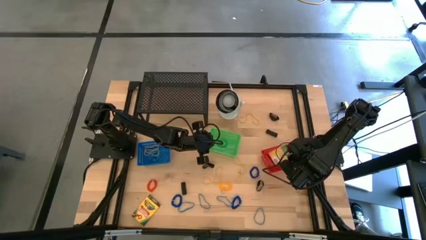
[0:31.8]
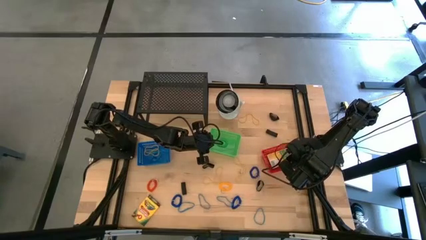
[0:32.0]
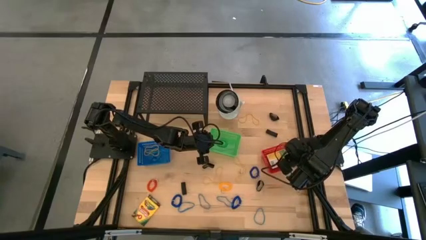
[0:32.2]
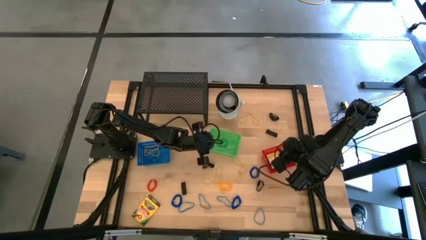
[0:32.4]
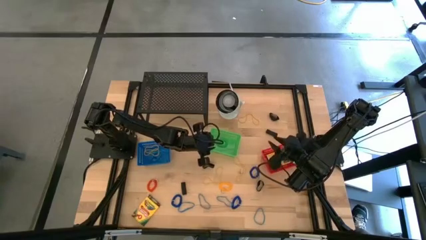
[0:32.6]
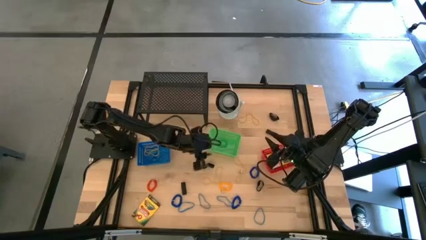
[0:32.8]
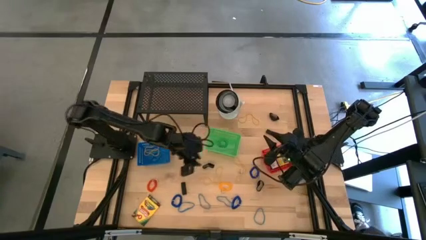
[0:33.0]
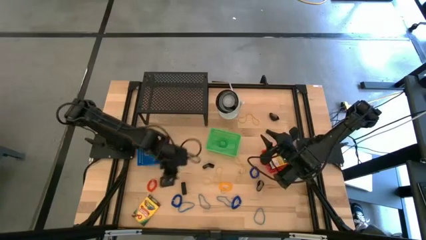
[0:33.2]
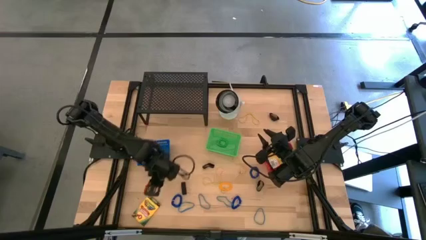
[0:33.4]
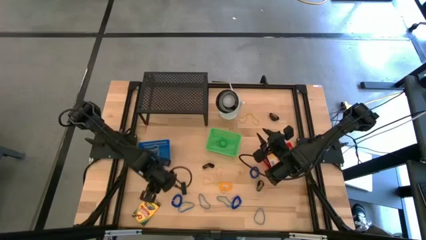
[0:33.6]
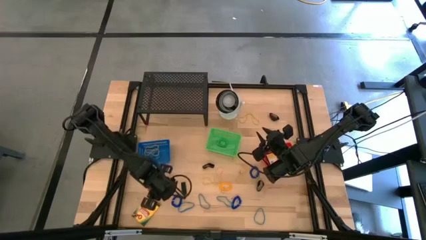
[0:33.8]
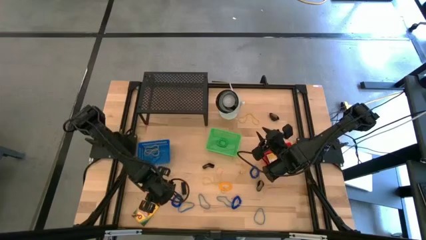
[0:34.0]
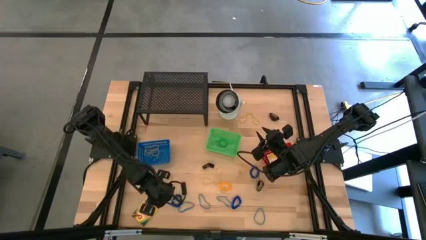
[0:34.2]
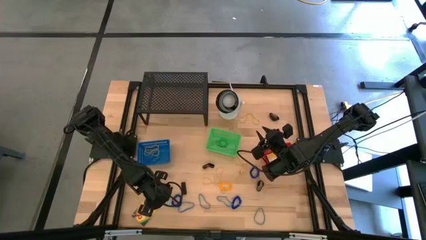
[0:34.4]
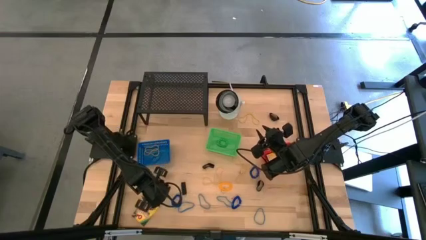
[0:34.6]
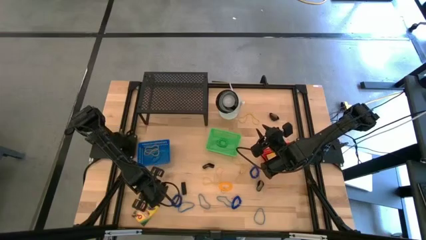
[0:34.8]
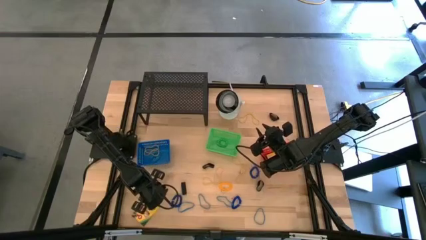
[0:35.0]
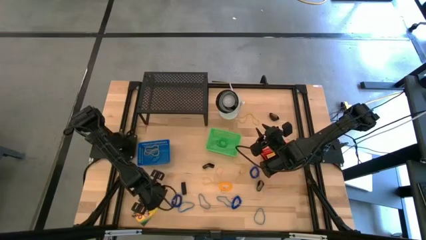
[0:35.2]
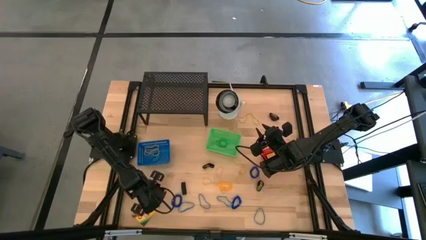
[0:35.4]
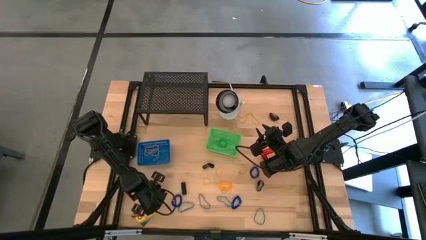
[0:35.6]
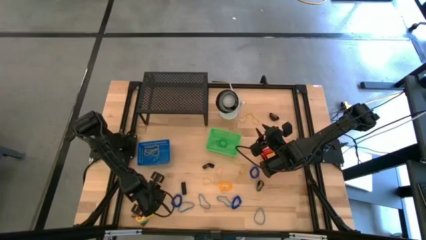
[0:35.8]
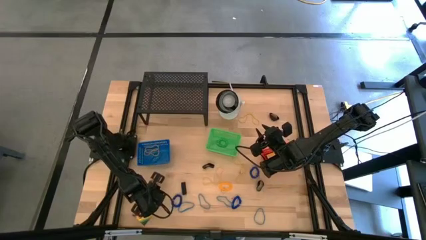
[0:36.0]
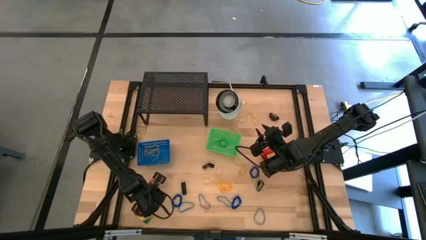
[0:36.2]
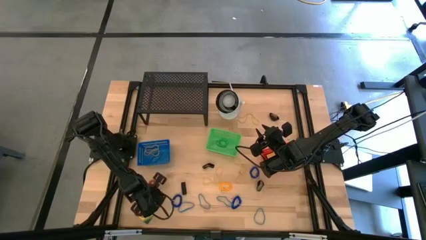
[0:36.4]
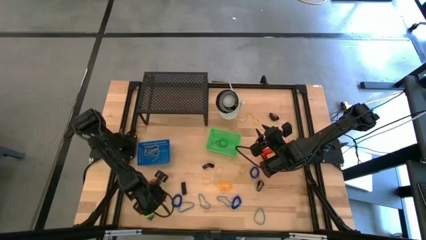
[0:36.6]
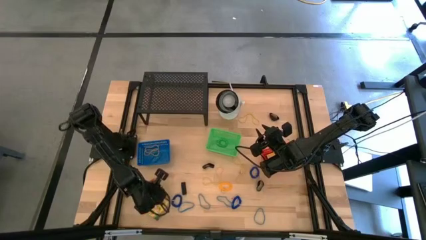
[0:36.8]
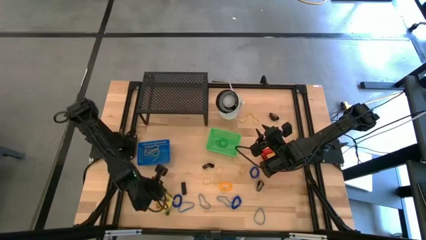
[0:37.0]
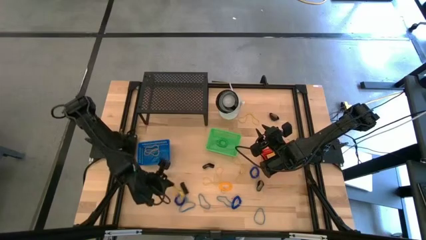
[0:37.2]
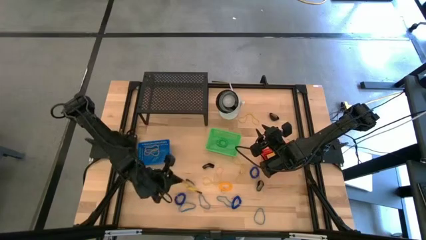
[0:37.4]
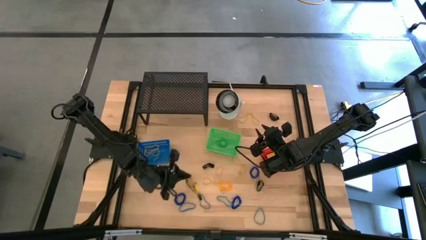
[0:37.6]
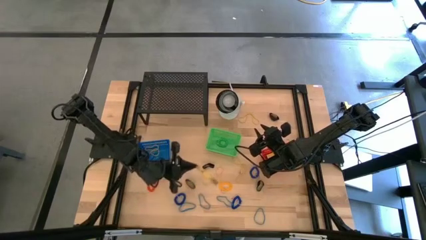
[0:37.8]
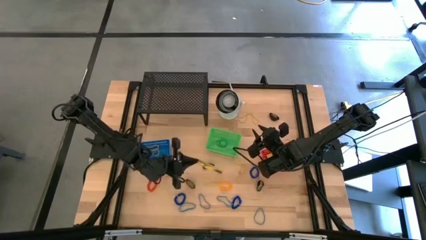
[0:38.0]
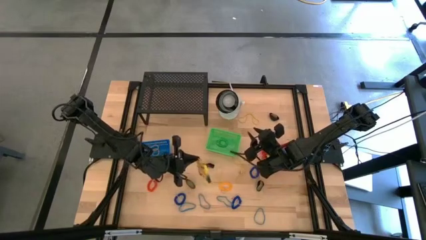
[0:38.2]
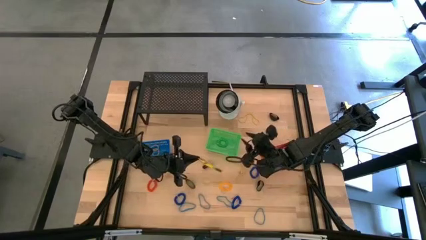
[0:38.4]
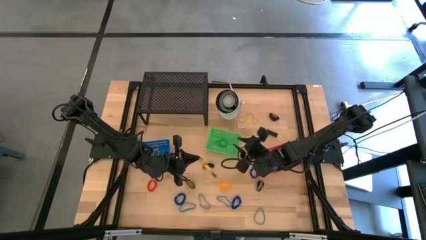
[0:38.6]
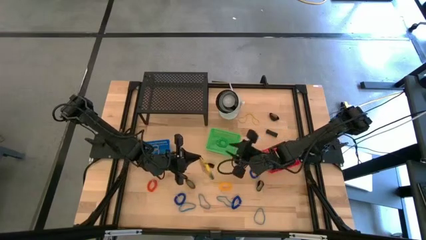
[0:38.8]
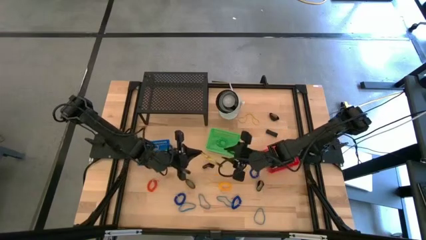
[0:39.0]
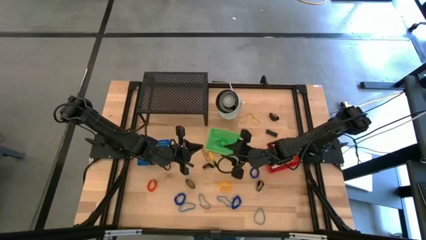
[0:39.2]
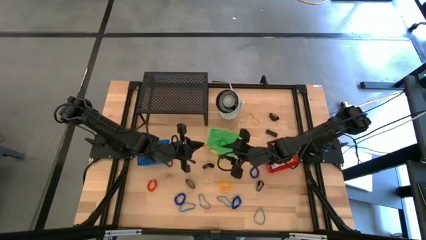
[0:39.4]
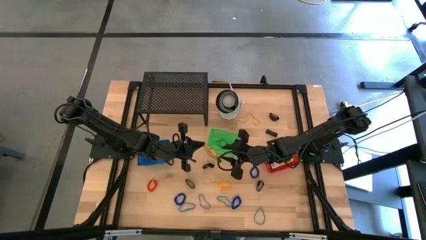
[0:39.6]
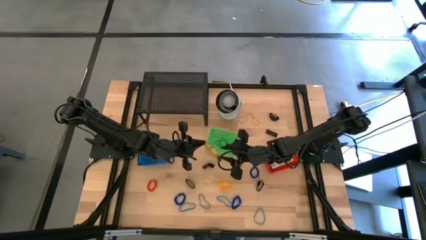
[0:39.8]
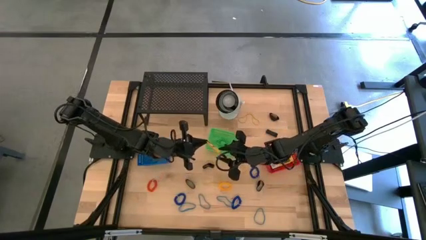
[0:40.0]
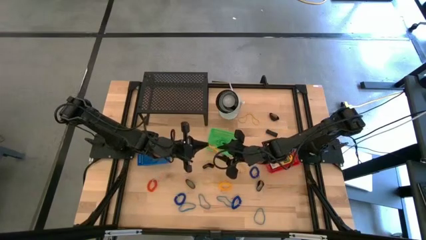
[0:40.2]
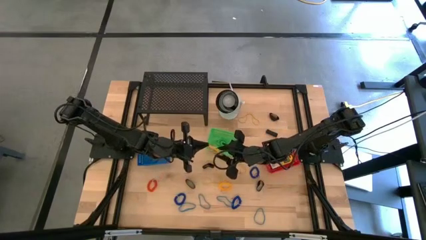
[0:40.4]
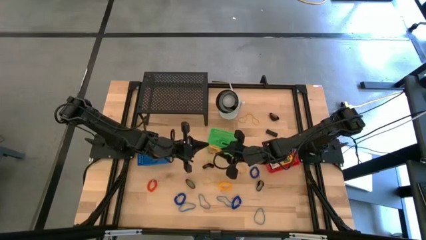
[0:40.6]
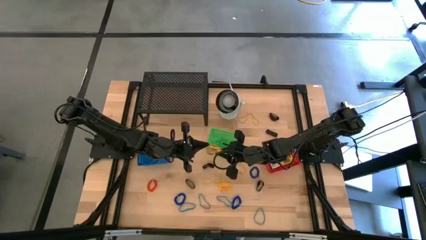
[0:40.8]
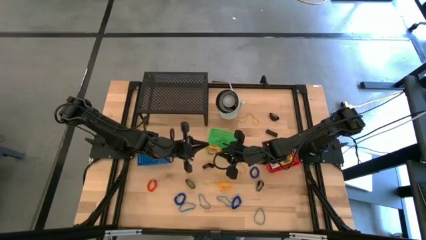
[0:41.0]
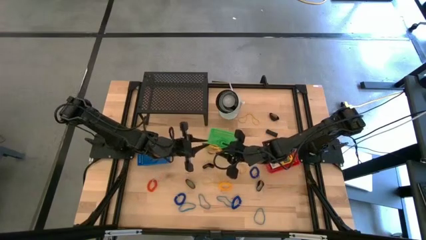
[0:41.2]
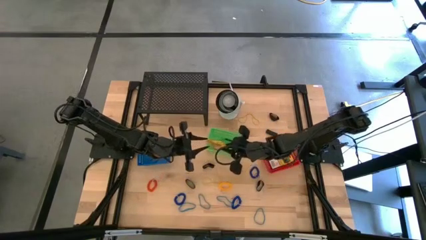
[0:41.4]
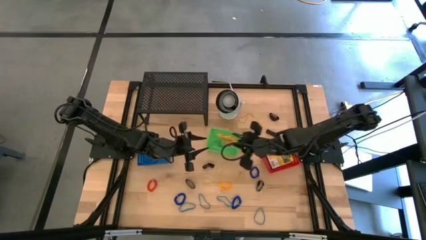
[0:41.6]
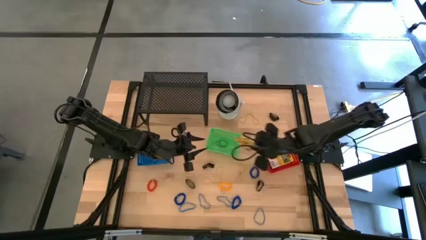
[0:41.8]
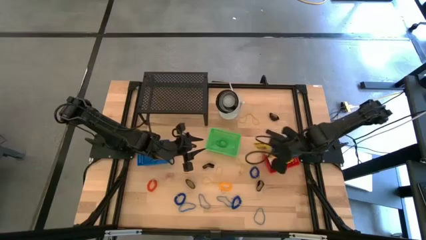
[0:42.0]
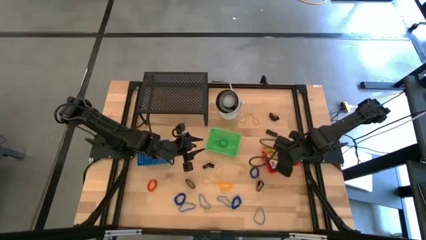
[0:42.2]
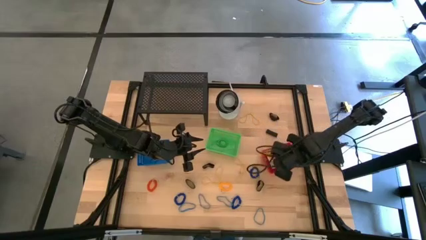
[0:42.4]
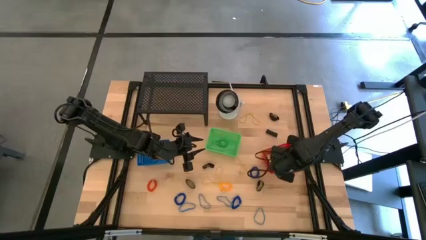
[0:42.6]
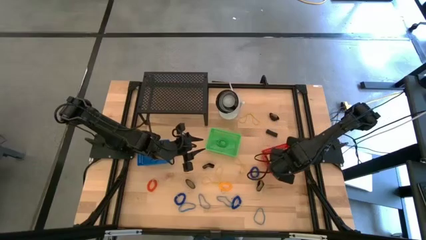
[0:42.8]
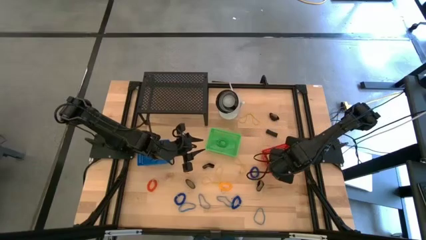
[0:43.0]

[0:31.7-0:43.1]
Task: Pick & Place Office Desk Supplies
Put the crayon box into the red bin

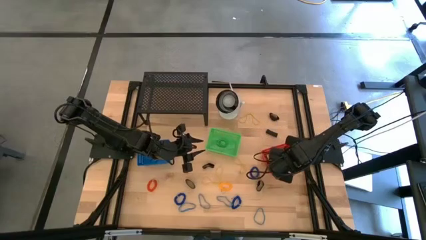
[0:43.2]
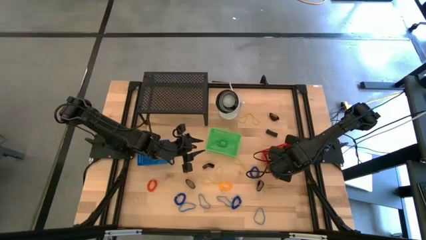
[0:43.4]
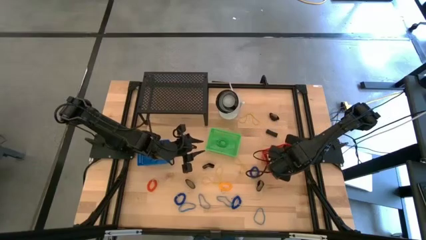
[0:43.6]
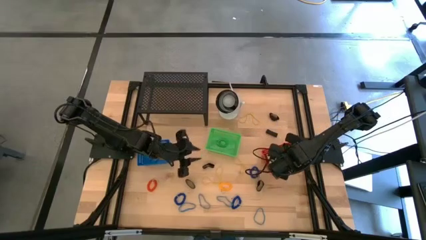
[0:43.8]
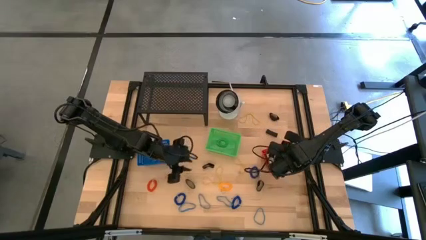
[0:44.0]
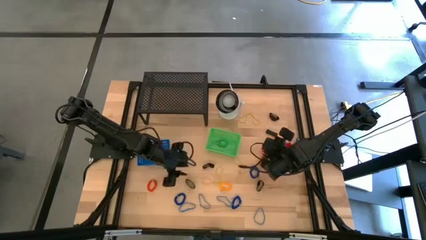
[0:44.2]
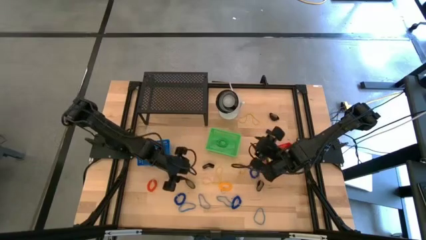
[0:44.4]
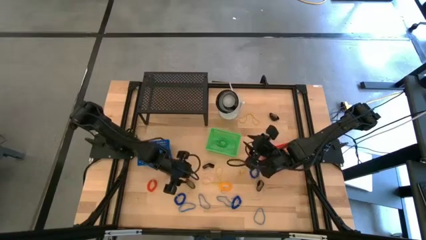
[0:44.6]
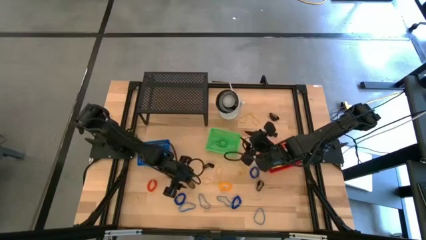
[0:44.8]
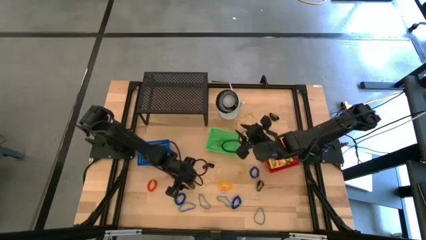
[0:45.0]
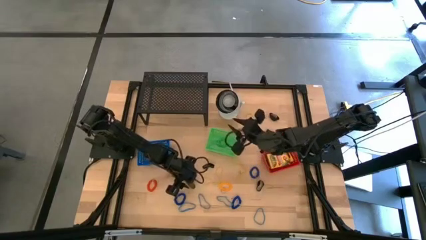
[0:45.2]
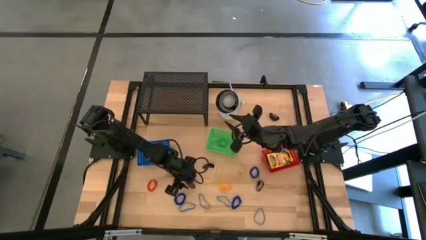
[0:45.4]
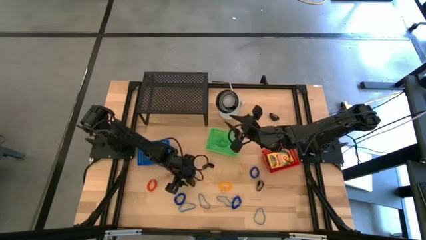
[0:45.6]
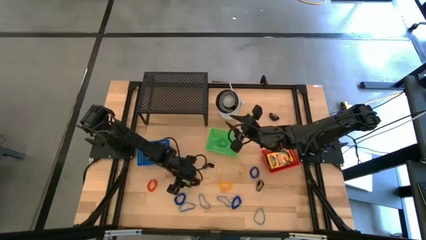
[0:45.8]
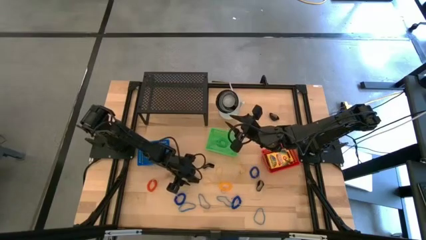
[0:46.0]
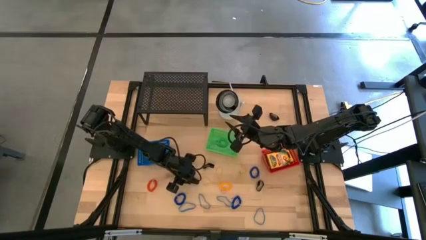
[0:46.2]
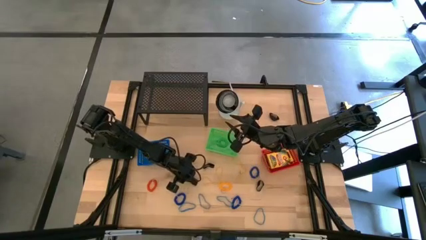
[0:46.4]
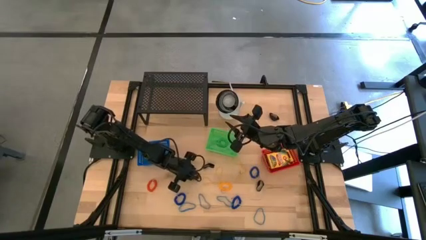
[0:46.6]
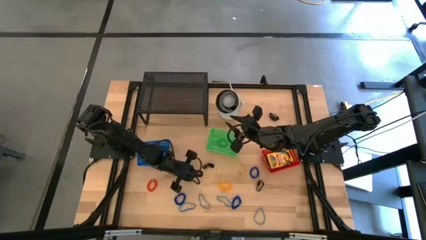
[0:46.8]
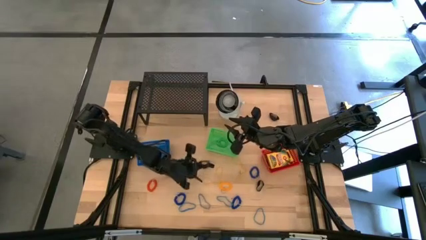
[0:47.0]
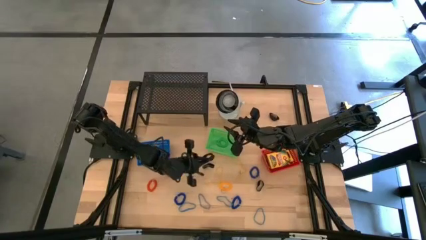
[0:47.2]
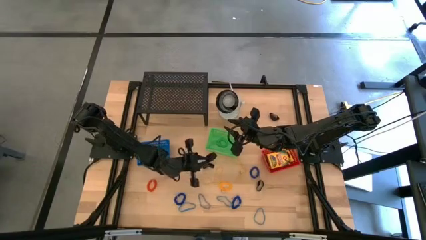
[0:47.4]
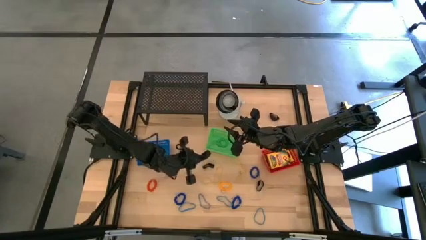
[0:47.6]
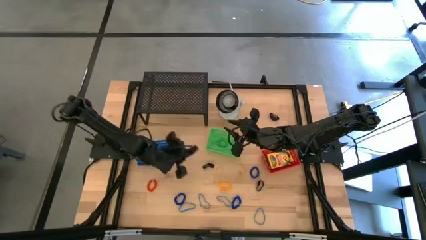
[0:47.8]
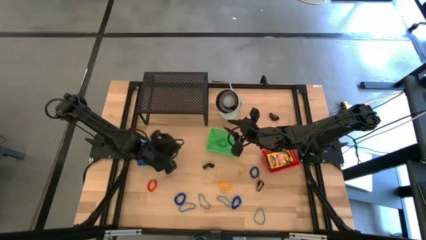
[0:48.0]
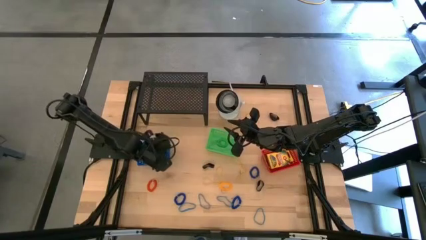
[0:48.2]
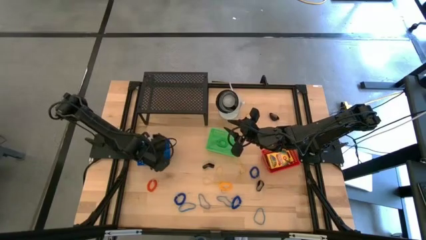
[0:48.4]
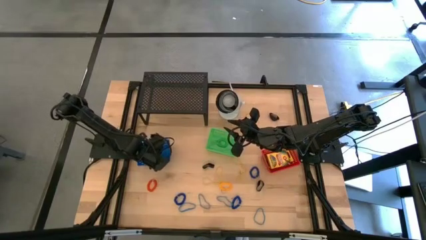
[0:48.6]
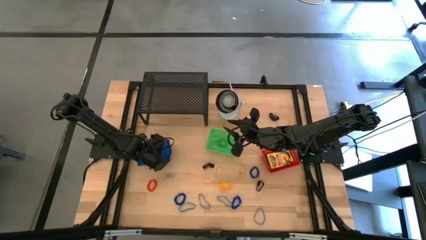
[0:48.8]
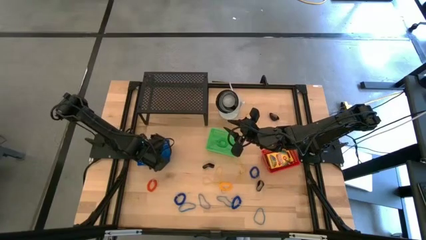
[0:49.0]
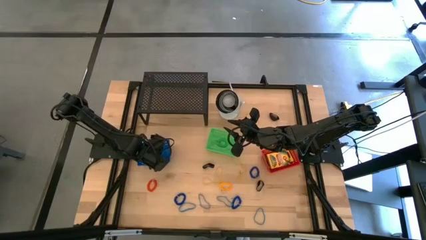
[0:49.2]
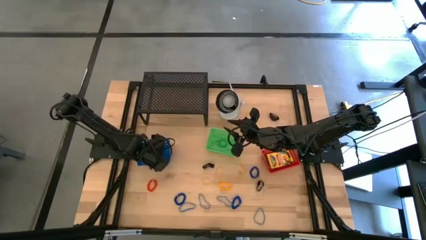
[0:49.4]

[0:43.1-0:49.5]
Put the black rubber band into the blue bin
